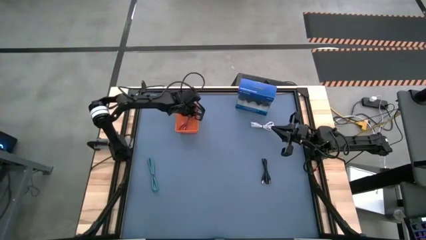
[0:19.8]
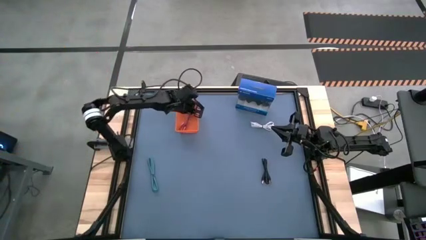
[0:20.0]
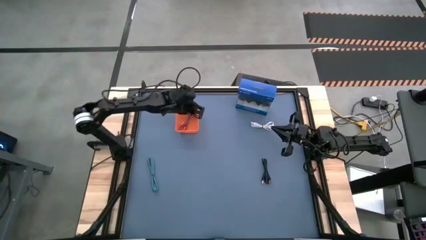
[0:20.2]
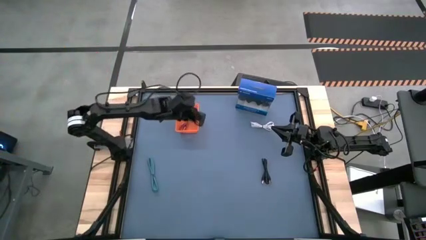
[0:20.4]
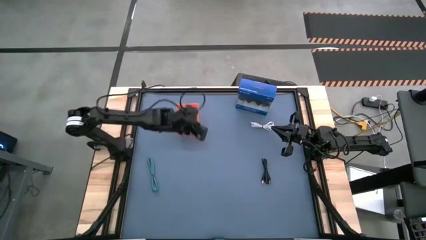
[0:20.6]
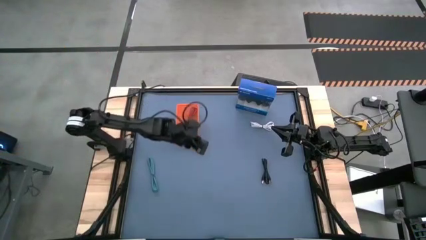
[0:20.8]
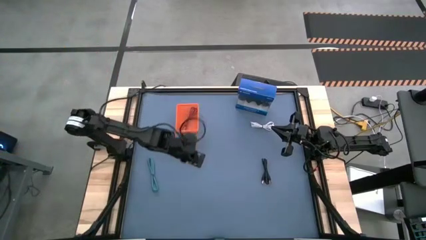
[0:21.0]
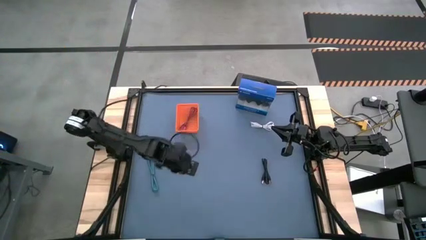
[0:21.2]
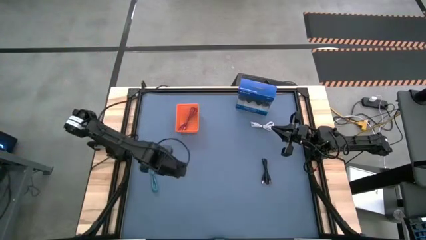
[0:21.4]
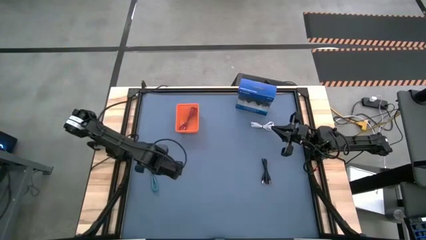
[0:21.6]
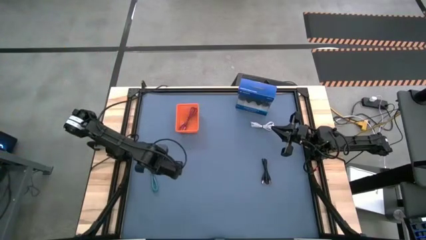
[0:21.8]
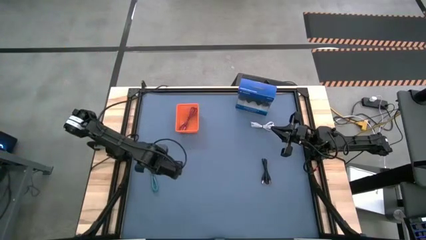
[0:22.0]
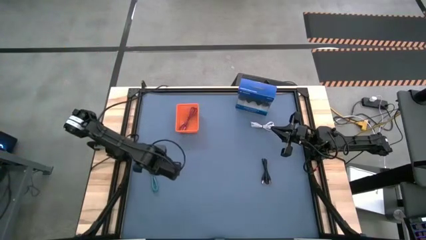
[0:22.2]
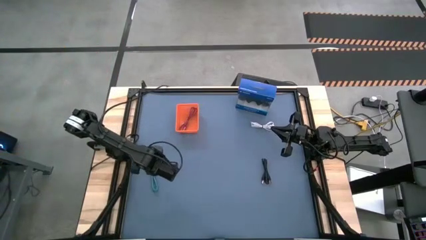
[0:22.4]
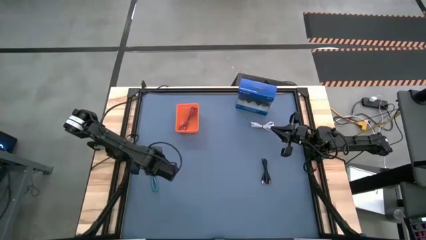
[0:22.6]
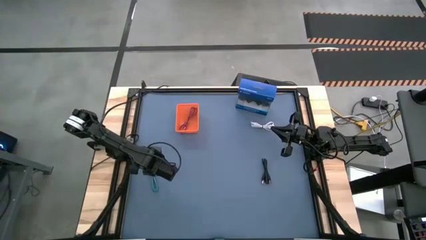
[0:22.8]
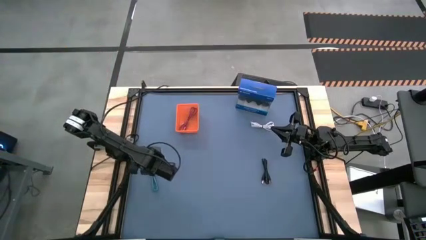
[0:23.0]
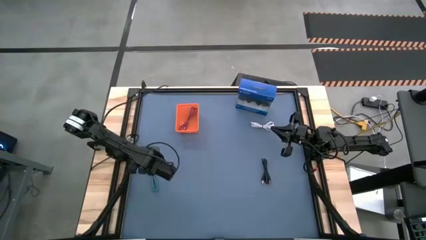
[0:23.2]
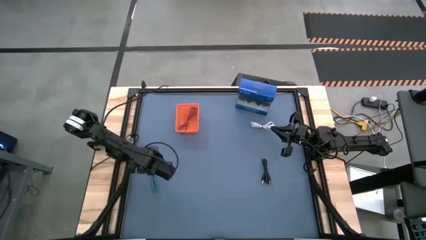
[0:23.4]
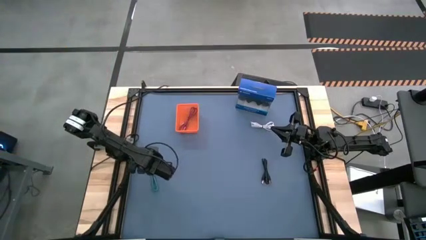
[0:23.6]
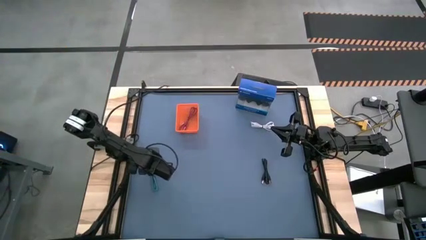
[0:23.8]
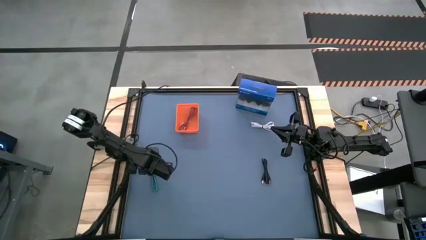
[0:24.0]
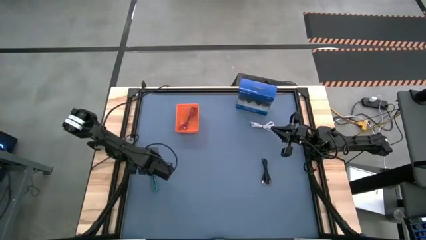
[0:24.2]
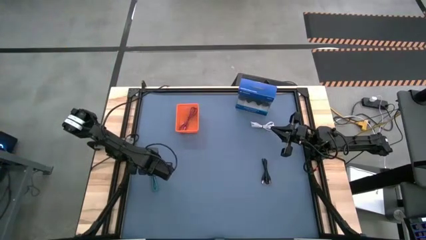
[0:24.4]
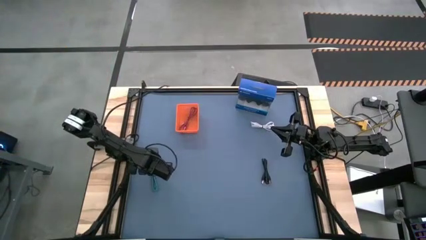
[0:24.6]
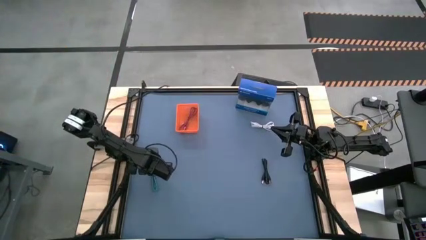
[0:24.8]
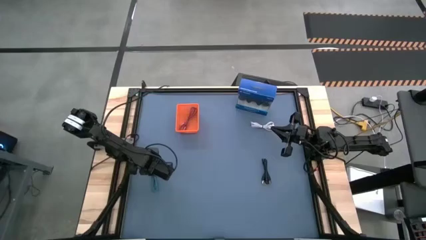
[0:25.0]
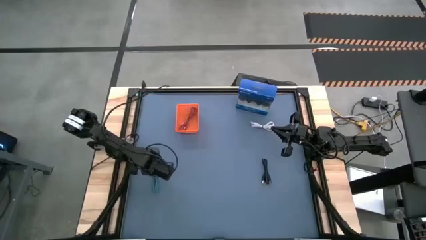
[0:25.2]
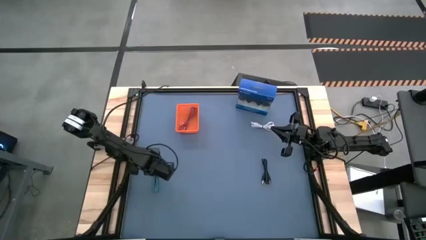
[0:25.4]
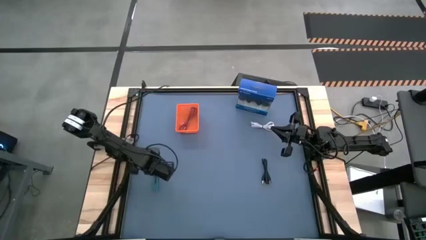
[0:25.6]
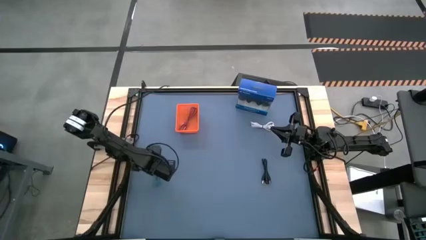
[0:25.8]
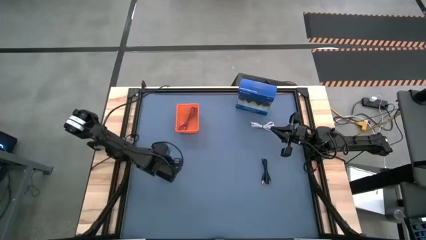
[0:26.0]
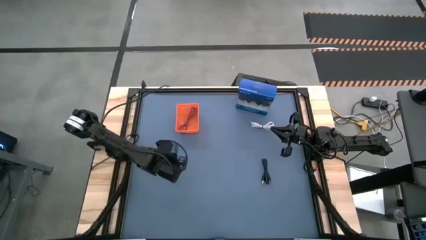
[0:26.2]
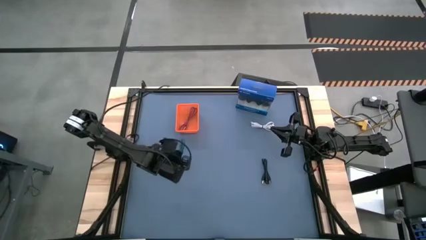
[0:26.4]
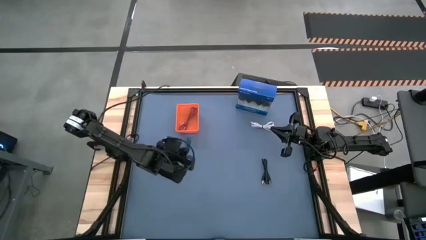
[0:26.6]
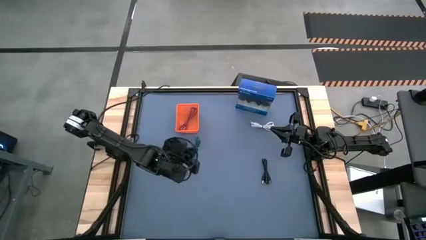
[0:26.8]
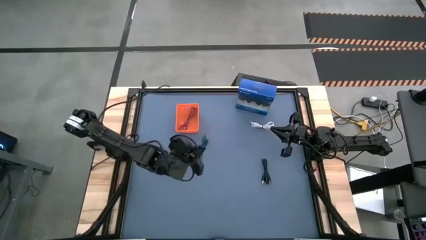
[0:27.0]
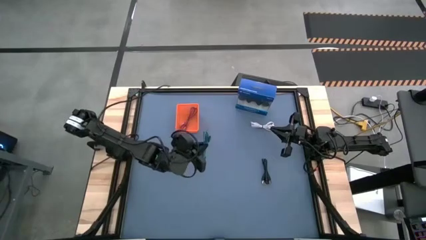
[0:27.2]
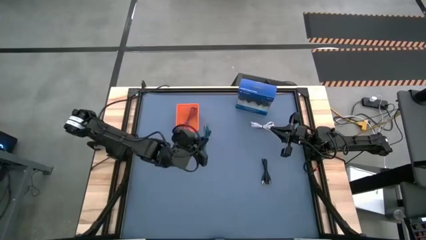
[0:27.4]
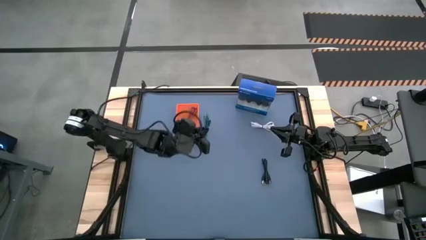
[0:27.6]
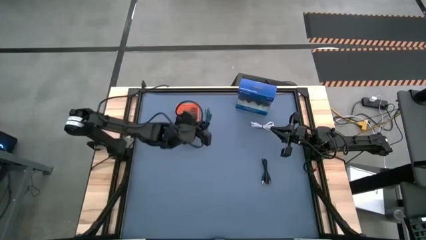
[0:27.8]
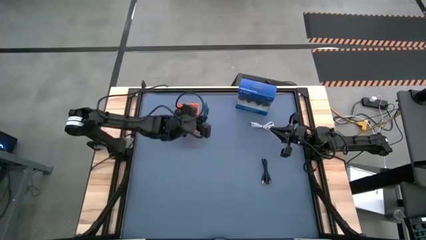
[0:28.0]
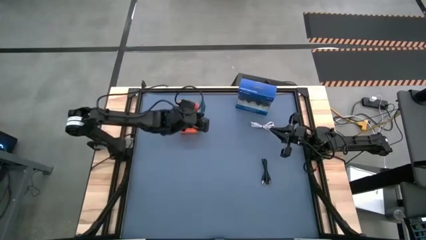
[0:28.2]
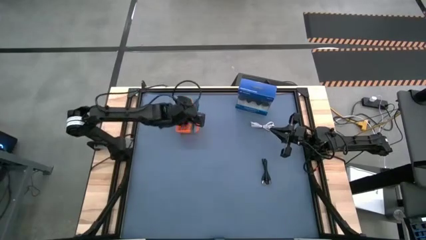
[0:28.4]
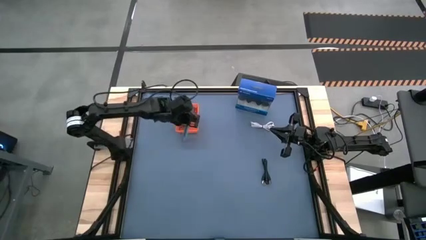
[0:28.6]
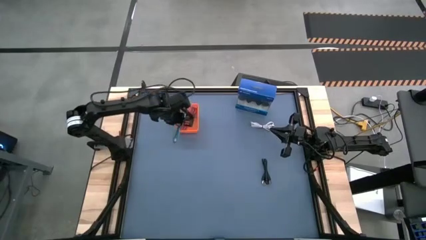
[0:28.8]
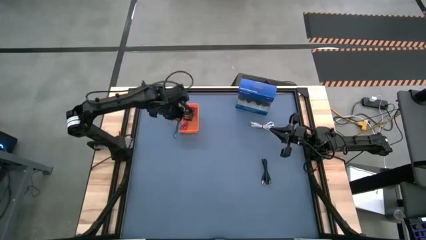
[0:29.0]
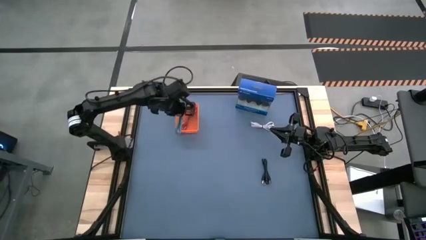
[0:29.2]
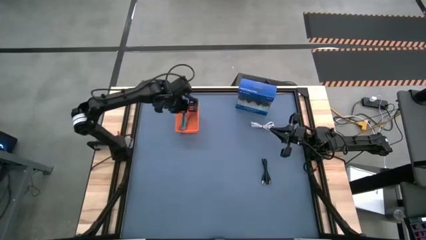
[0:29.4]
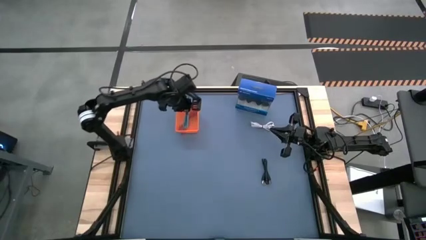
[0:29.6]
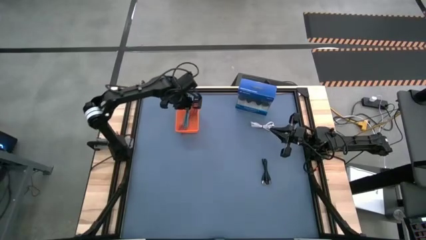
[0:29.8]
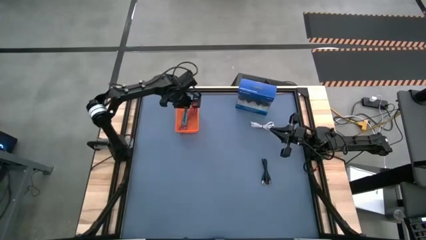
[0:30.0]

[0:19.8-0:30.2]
Task: Pick and place USB-C Cables
Put the green charger cable into the orange bin

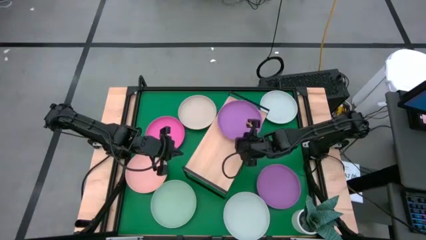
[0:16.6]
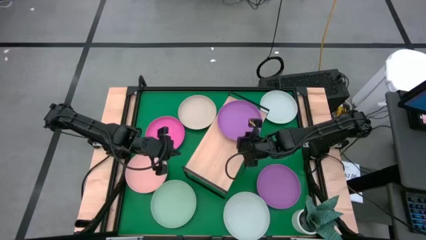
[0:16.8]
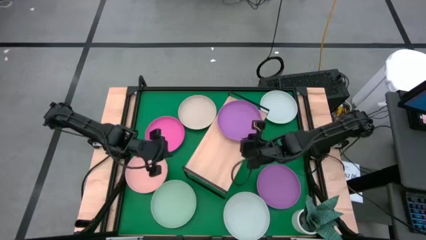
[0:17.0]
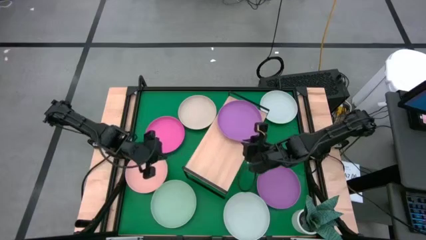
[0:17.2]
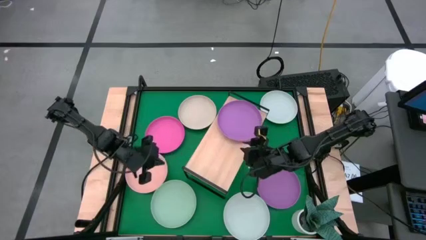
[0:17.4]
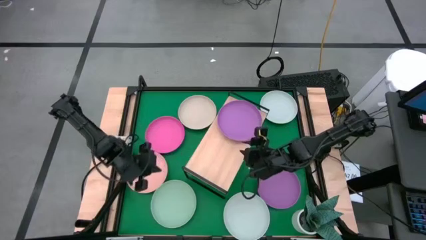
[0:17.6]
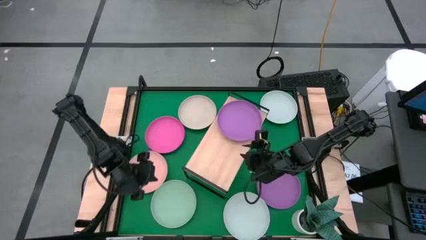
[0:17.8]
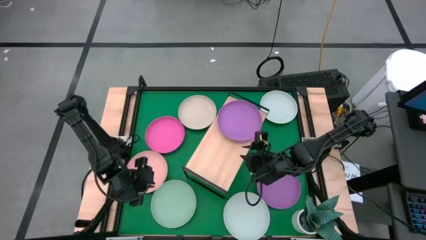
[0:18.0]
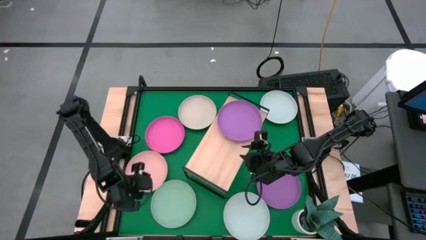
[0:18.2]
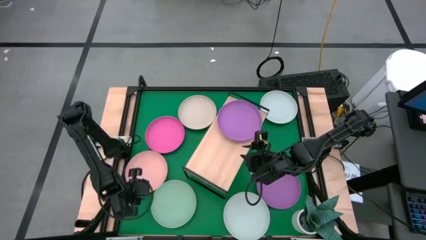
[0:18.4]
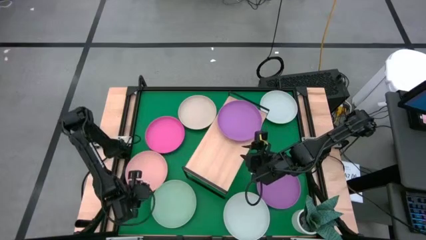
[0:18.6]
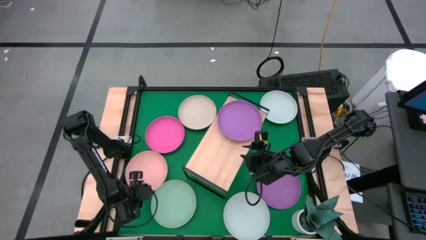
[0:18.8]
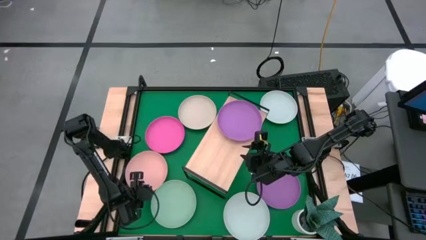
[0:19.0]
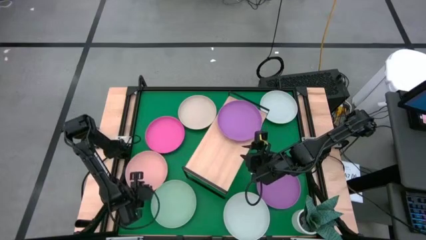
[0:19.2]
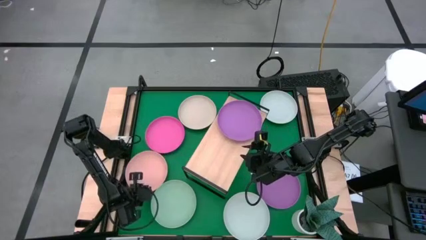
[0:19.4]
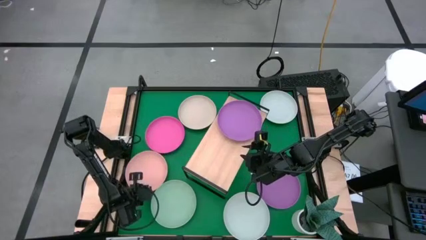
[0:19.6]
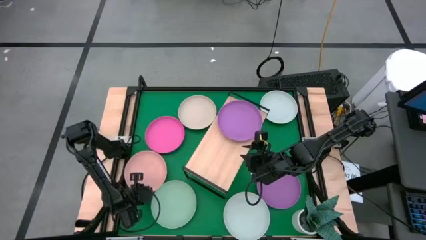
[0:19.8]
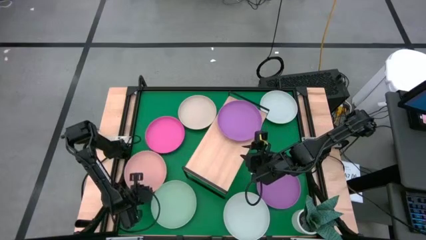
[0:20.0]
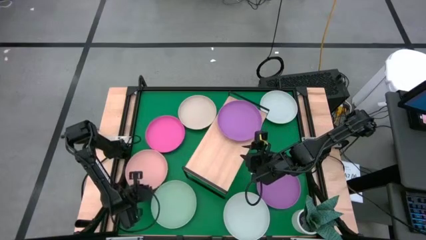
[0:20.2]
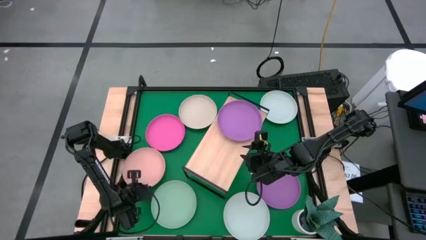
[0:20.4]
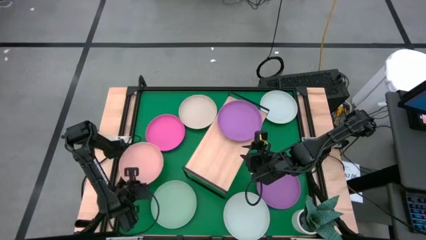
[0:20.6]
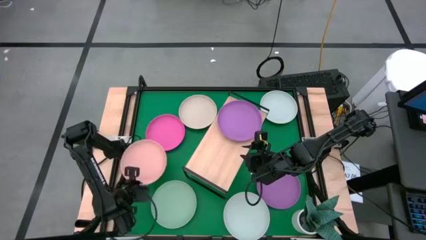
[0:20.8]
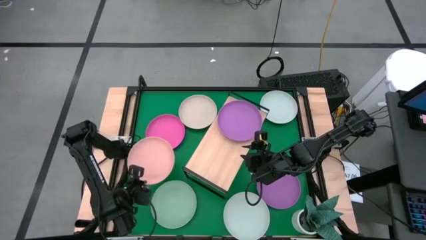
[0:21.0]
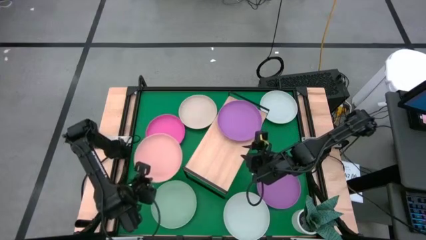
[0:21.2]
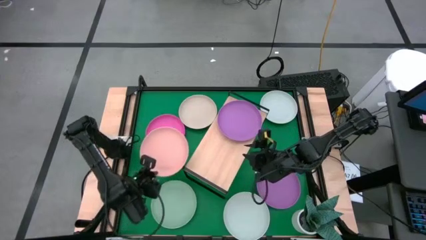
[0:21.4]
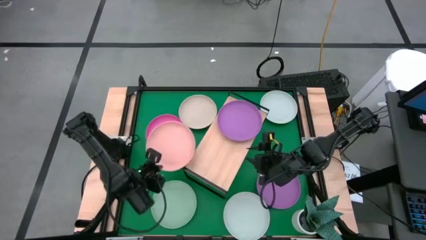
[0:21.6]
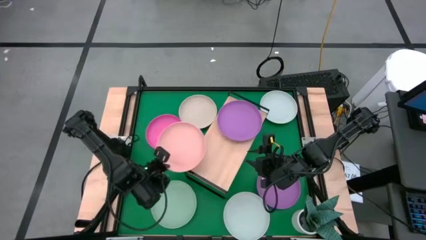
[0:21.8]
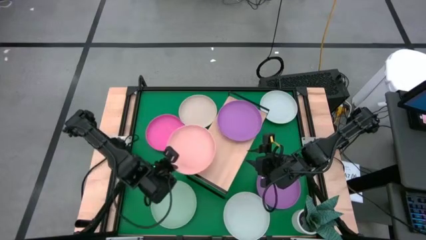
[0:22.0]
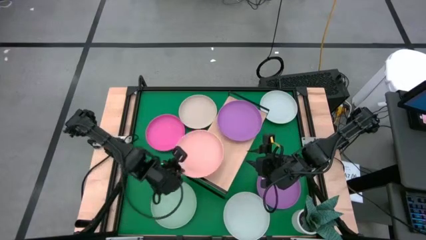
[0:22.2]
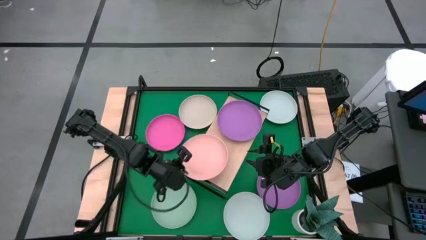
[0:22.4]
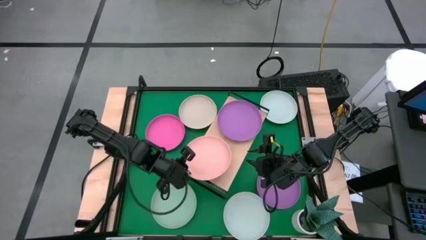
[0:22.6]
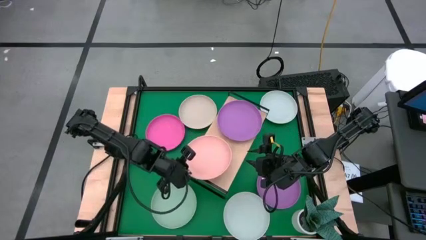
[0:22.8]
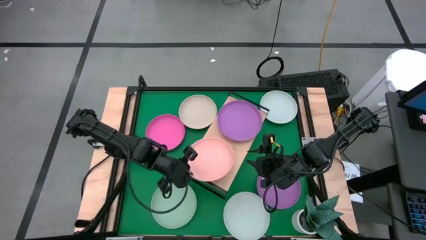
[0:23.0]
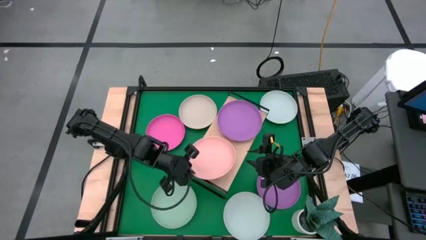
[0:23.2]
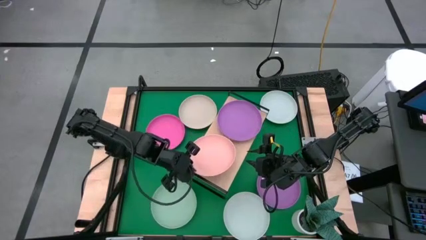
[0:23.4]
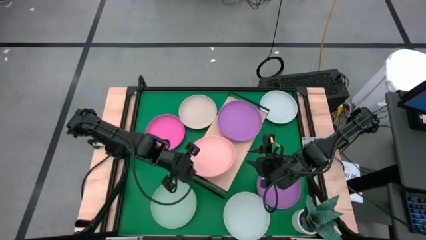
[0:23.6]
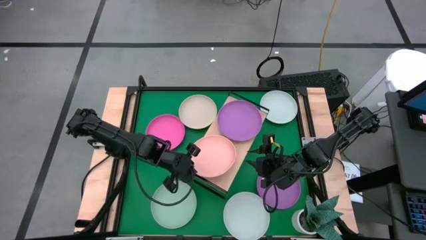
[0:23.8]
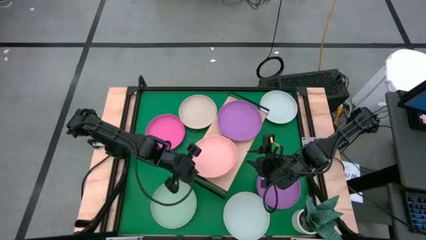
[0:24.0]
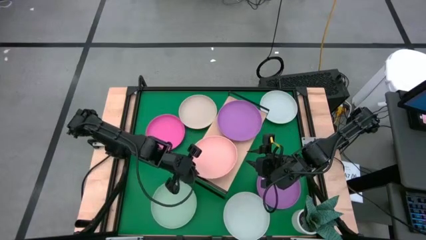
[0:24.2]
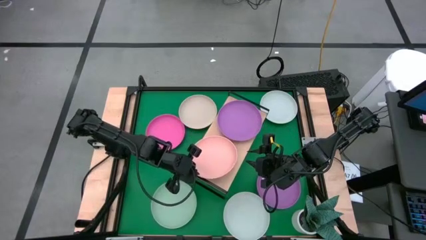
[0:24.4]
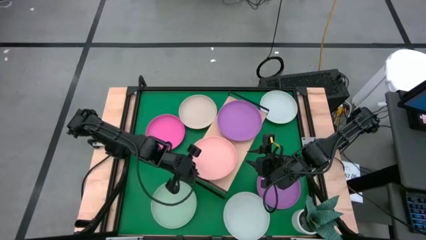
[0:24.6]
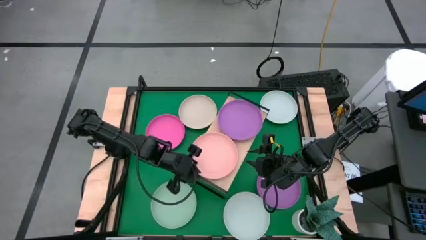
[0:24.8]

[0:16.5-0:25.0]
Task: Place and stack plates onto a shelf
Put the light pink plate on the shelf
